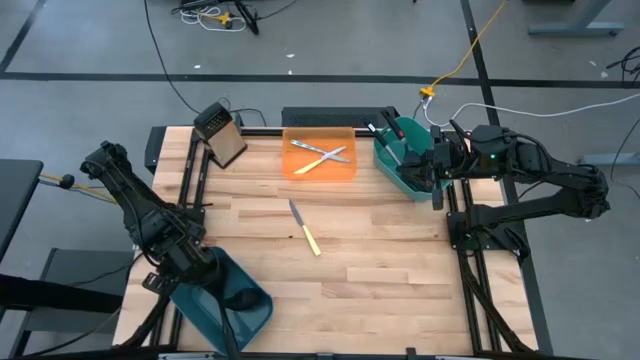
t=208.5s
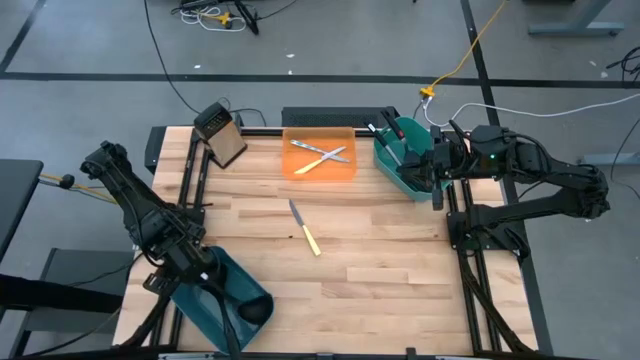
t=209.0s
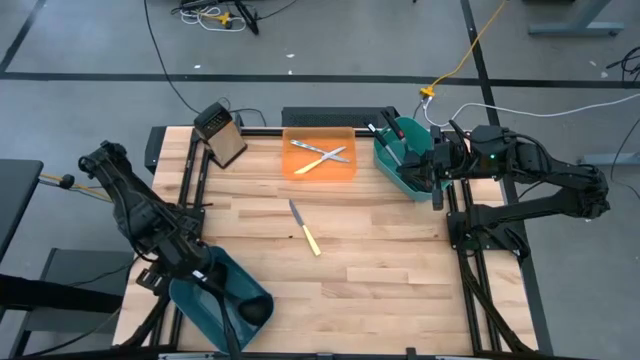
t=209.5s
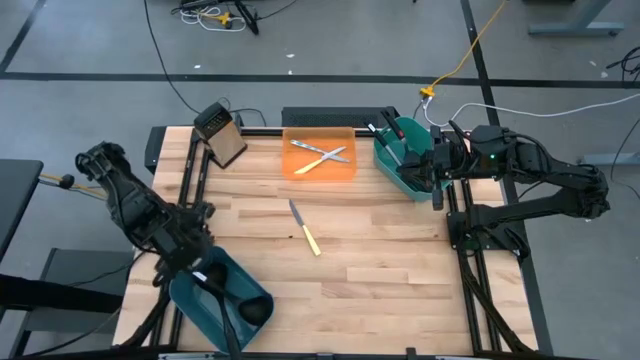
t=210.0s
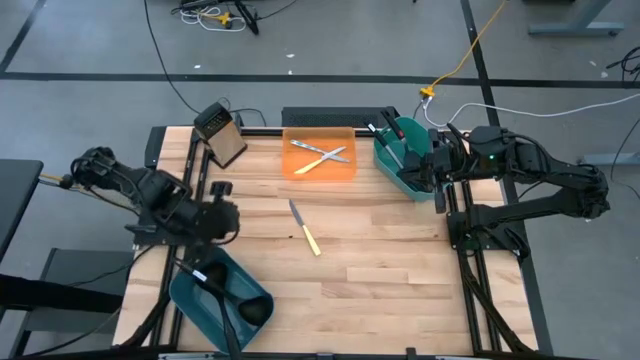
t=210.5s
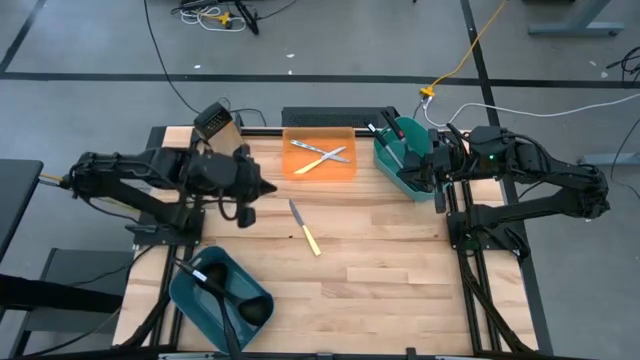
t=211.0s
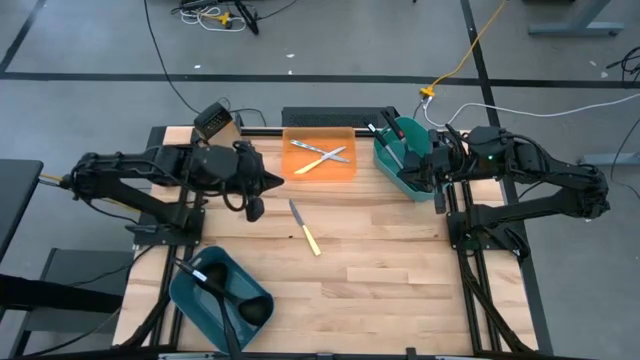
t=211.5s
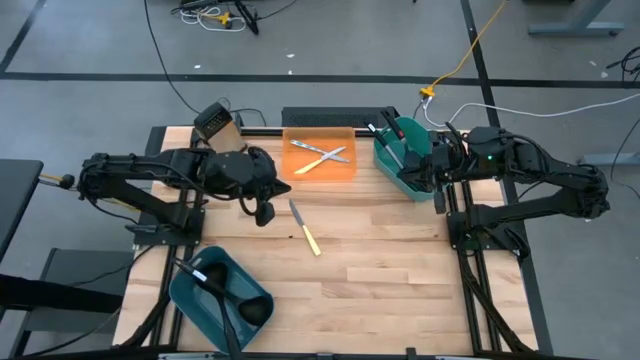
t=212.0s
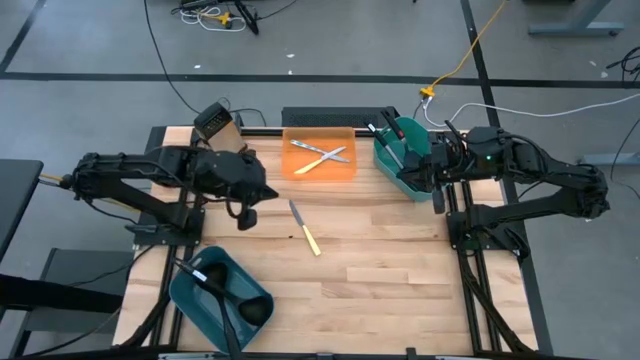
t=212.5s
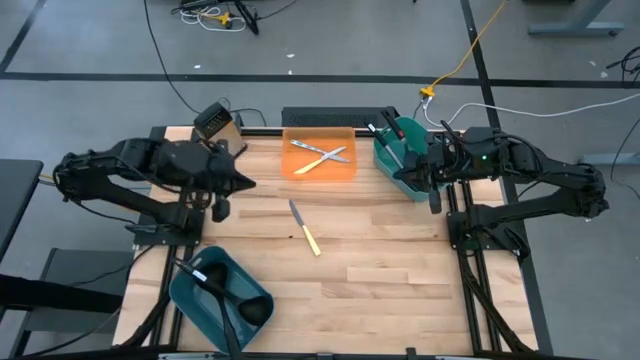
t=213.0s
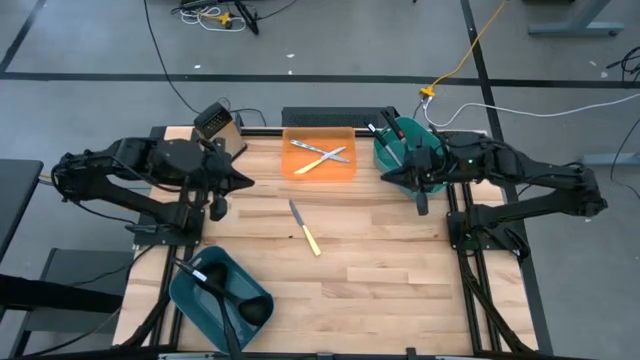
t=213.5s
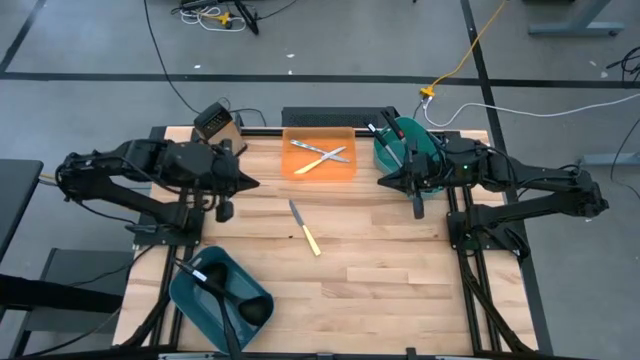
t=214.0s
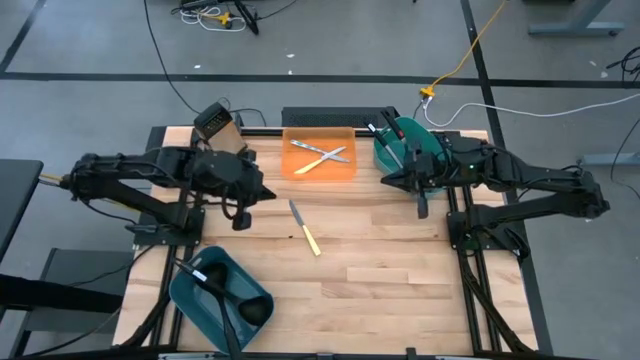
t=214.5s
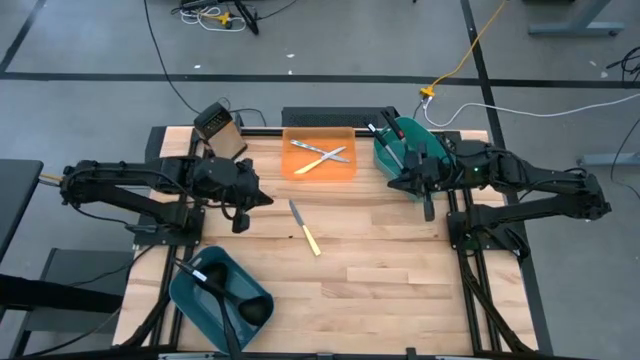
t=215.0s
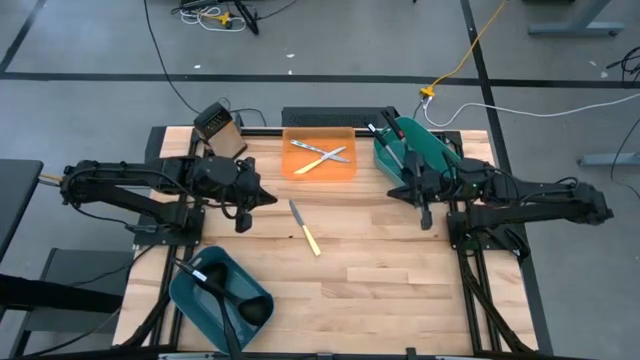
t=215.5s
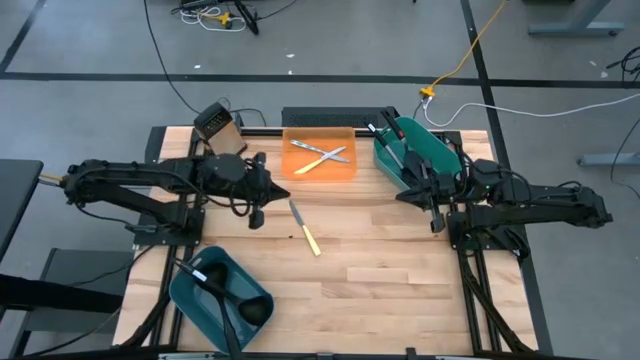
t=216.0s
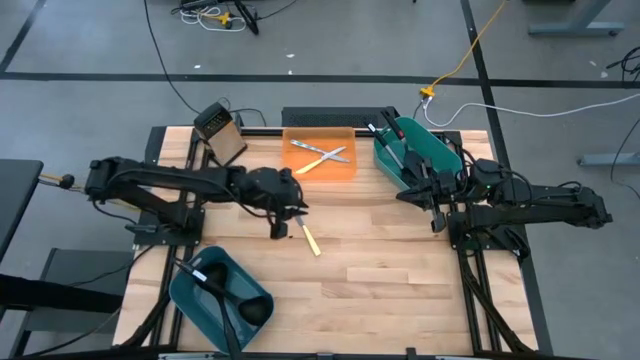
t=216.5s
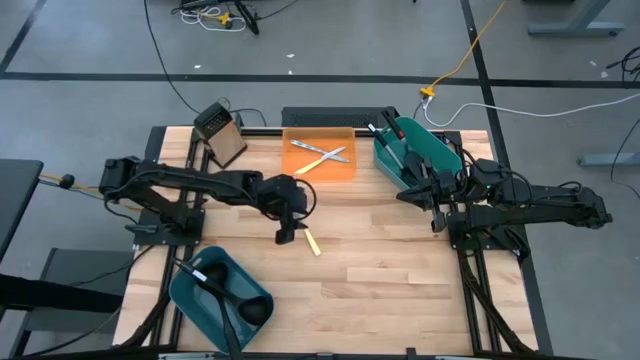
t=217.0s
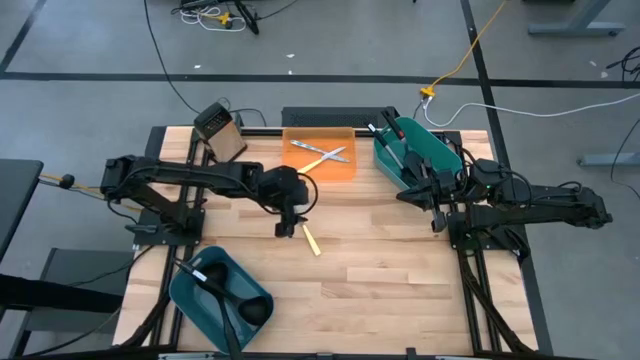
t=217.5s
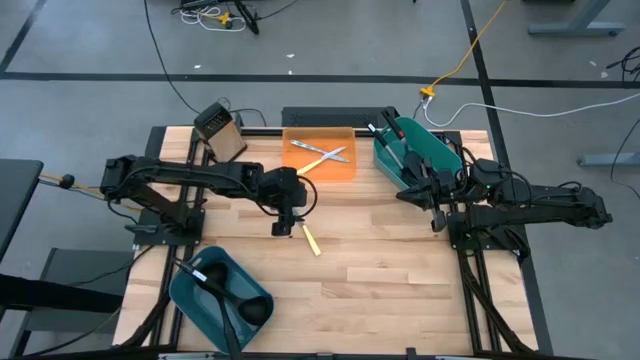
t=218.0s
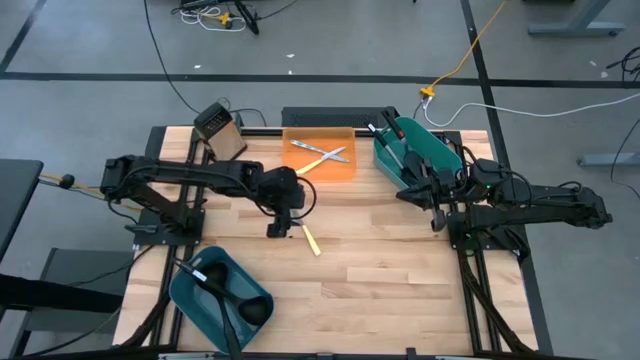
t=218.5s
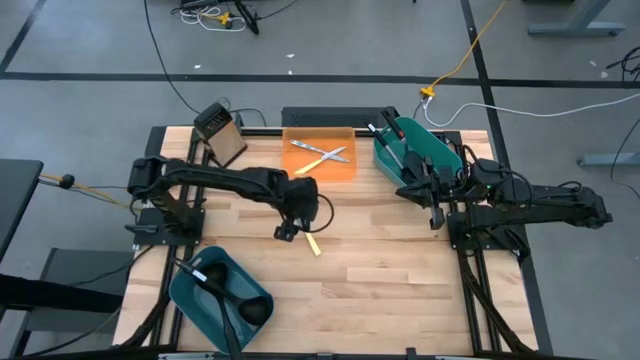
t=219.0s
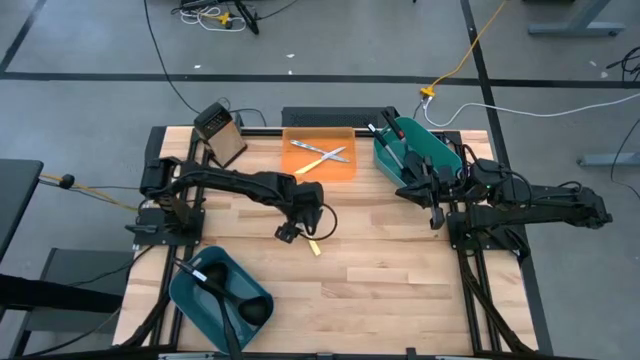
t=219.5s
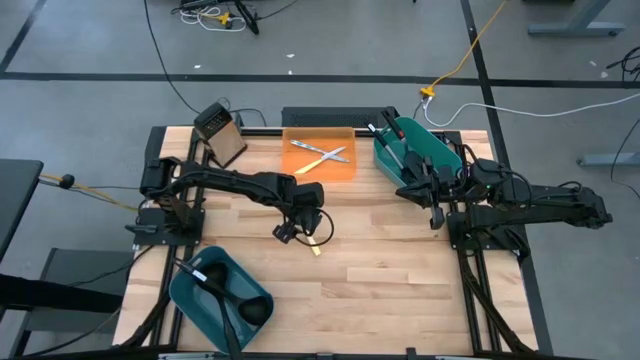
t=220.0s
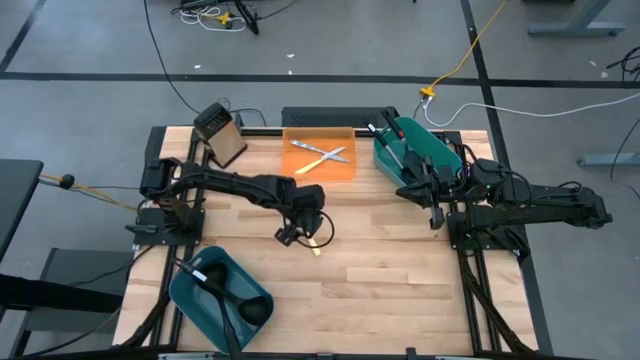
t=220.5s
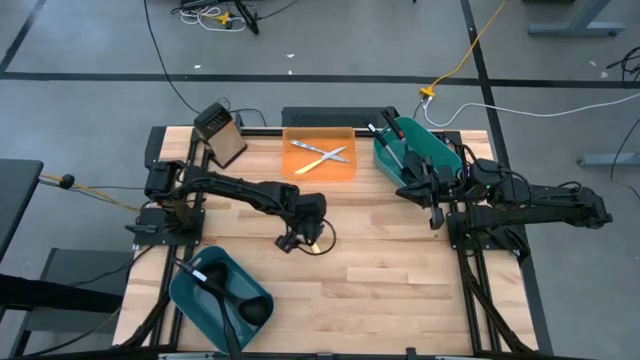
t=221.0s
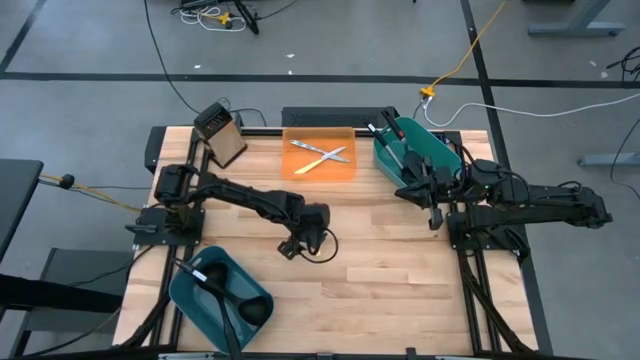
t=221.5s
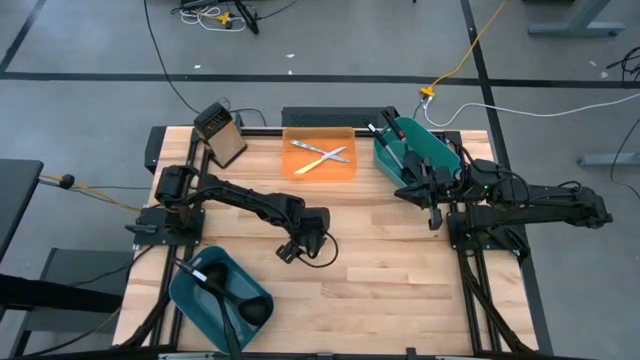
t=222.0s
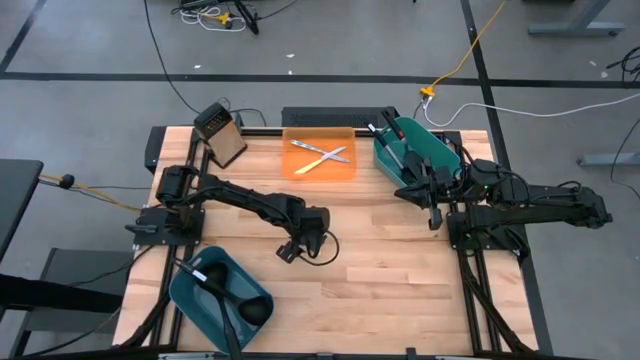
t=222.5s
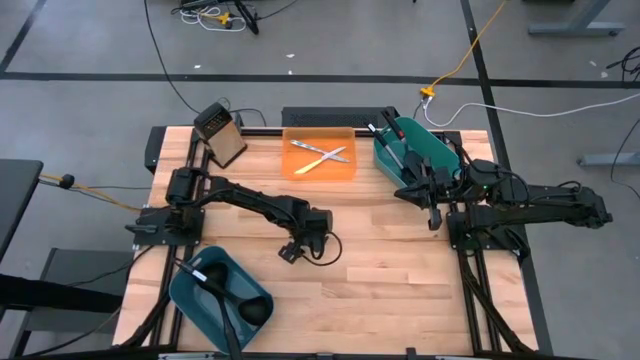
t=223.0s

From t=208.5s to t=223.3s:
Task: Pick & Place Kitchen Items
Put the yellow knife into the orange bin

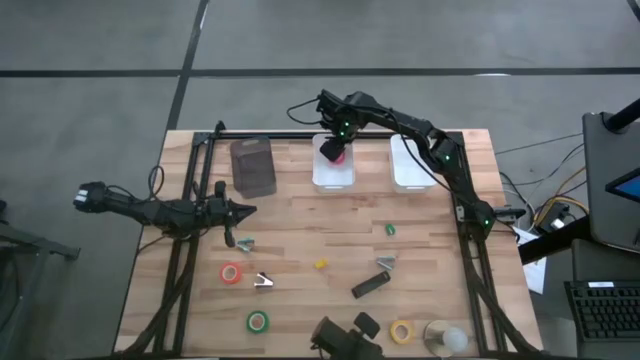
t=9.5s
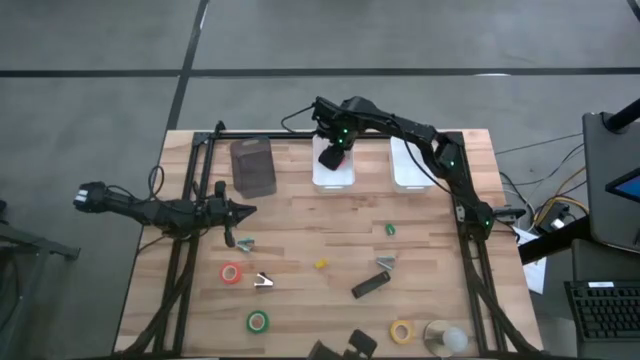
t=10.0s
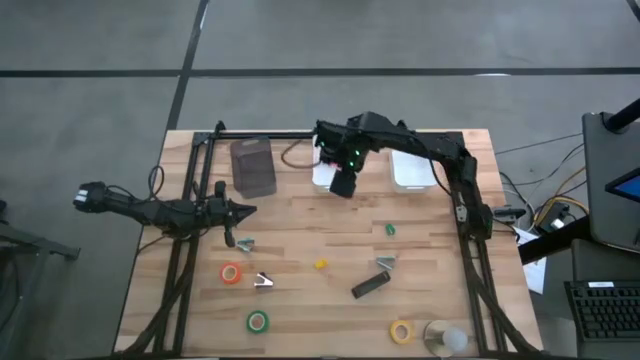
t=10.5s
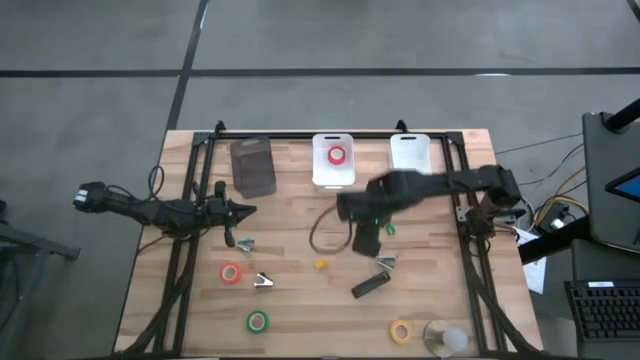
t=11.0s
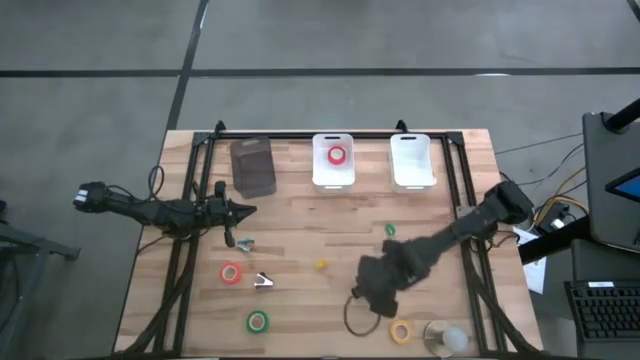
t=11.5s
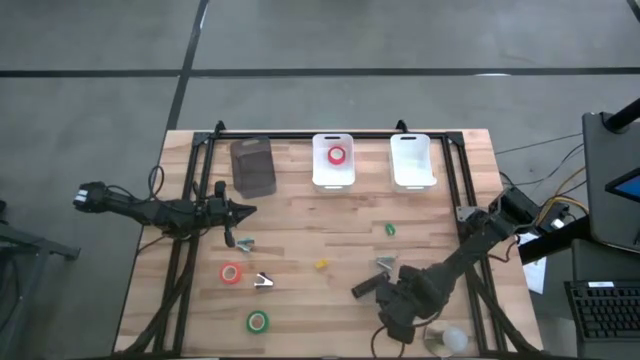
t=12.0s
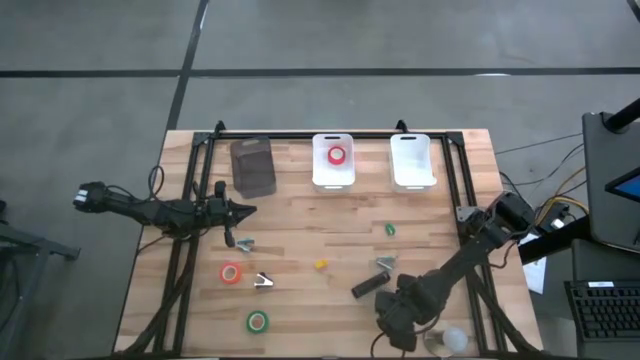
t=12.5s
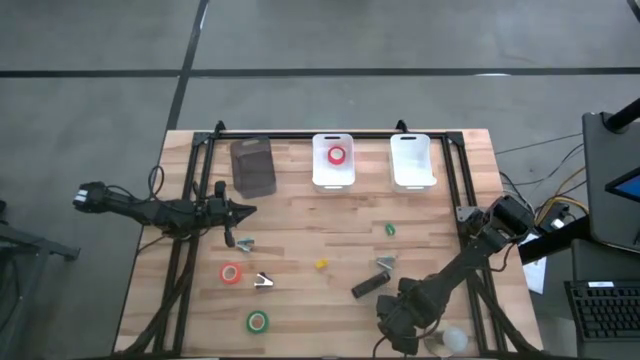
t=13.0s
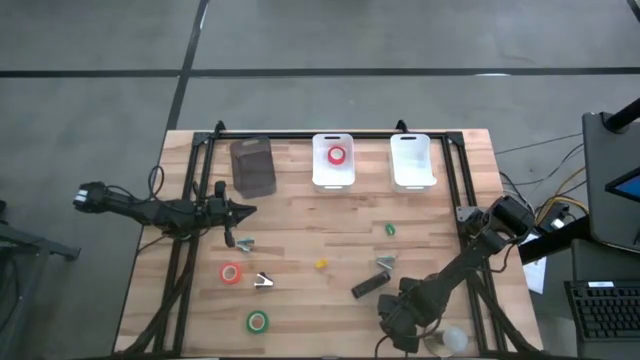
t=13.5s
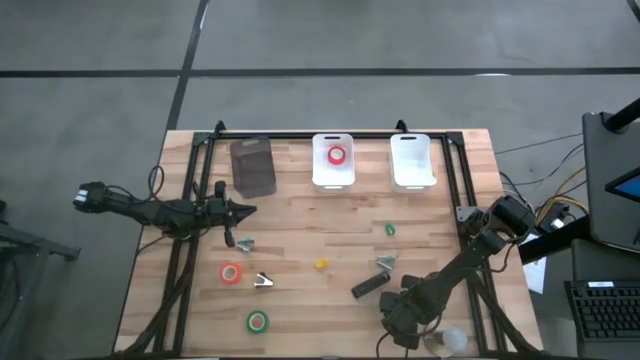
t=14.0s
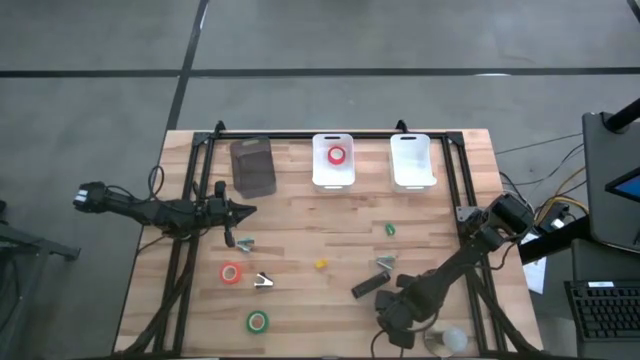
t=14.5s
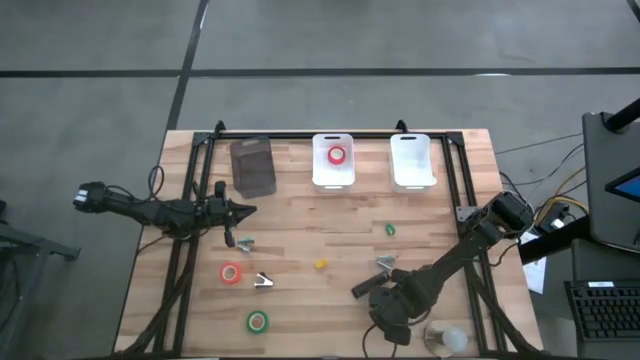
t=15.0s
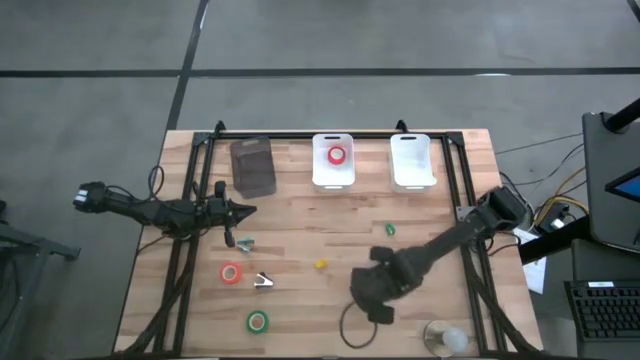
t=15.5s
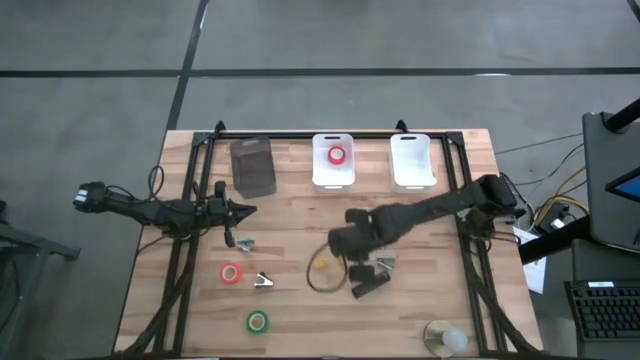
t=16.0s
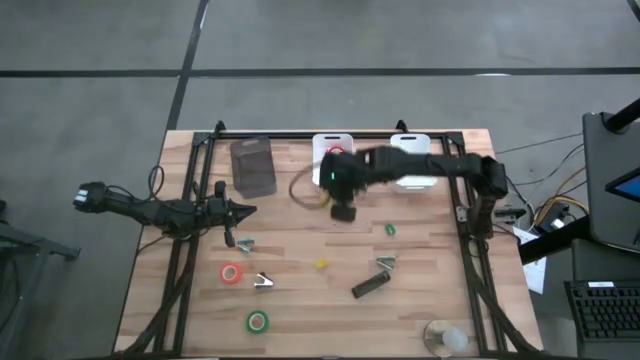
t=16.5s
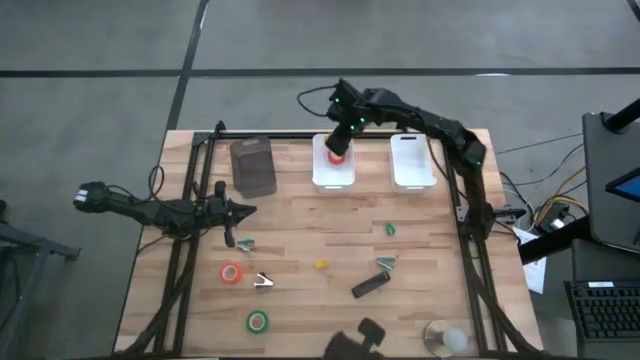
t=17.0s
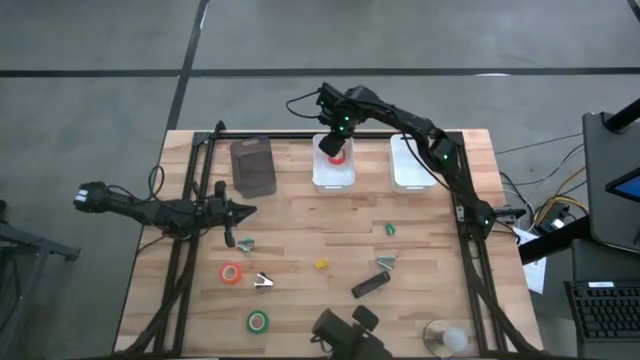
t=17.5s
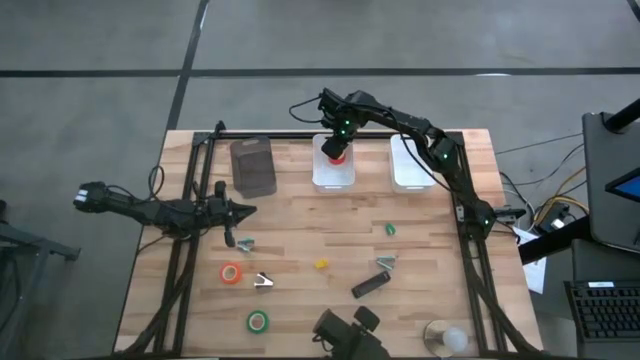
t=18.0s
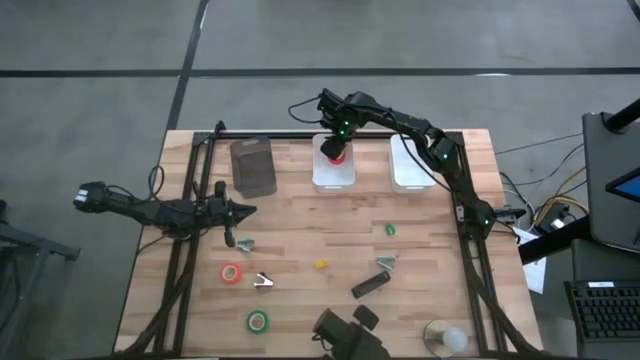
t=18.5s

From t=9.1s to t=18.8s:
Task: Pick and place Stapler, Stapler remover, tape
Put the yellow tape into the left white bin
